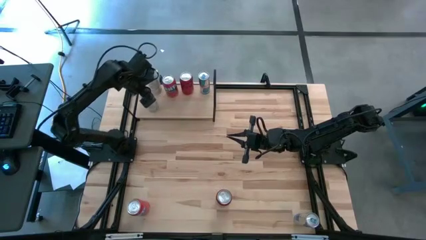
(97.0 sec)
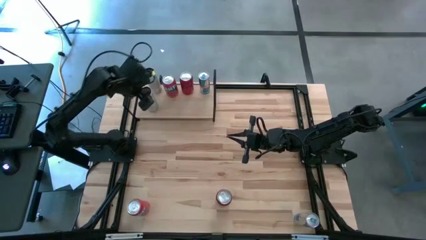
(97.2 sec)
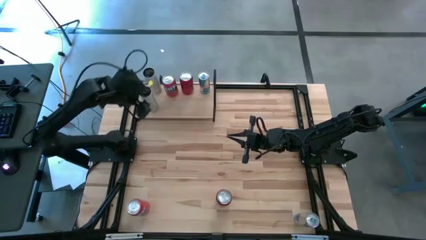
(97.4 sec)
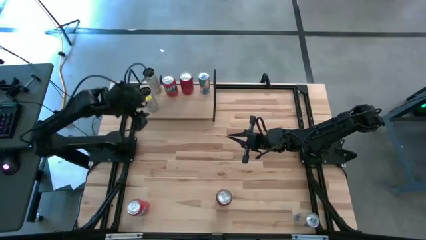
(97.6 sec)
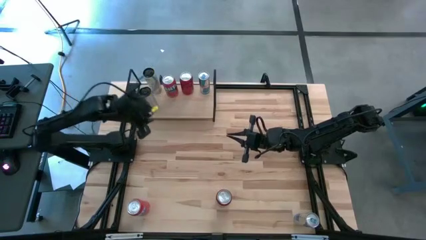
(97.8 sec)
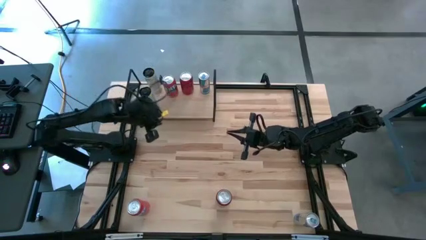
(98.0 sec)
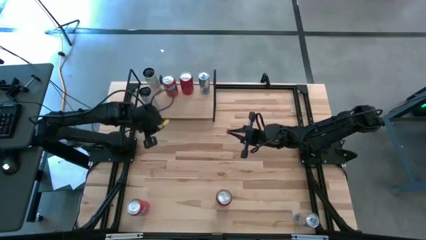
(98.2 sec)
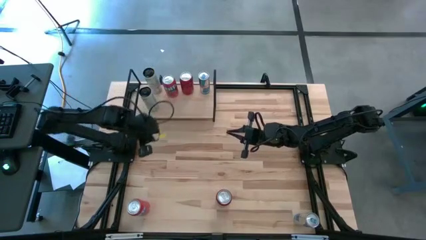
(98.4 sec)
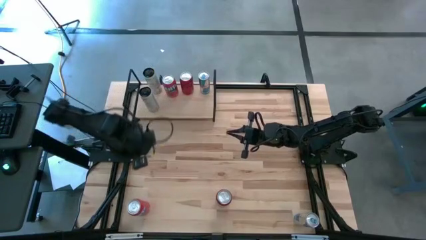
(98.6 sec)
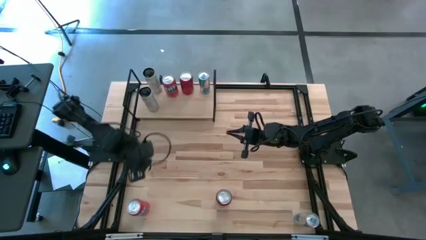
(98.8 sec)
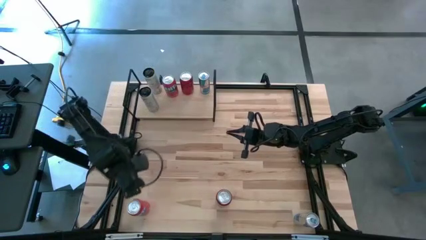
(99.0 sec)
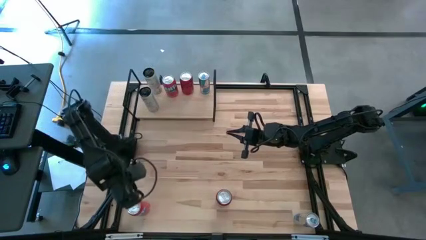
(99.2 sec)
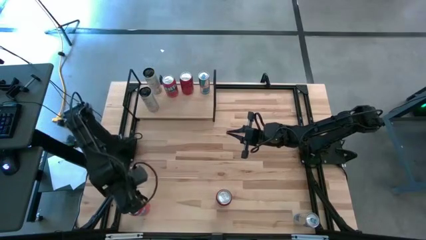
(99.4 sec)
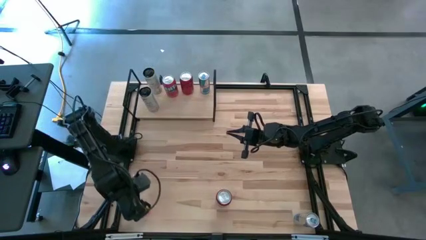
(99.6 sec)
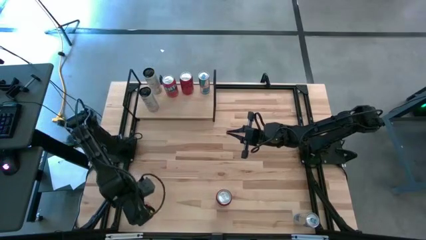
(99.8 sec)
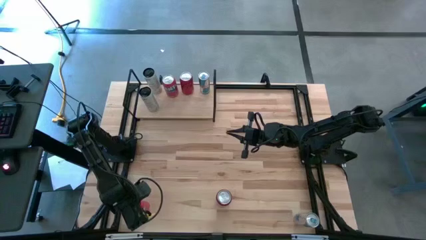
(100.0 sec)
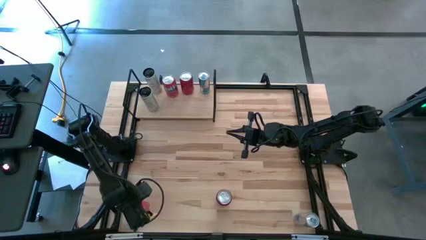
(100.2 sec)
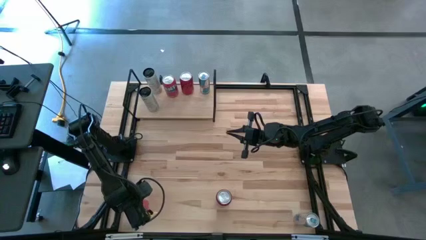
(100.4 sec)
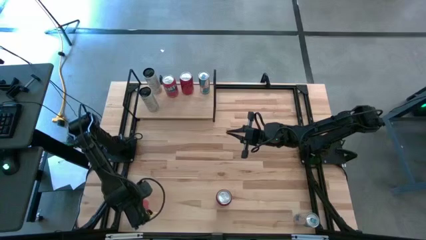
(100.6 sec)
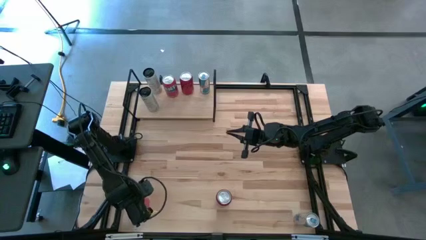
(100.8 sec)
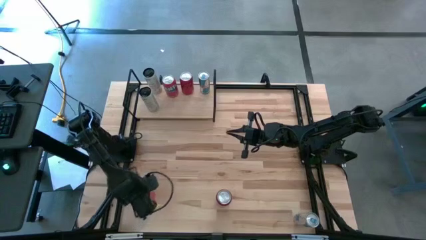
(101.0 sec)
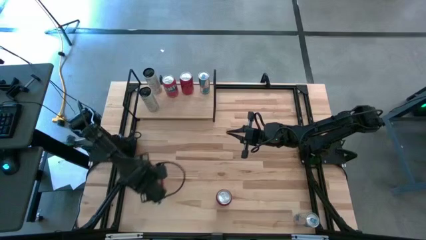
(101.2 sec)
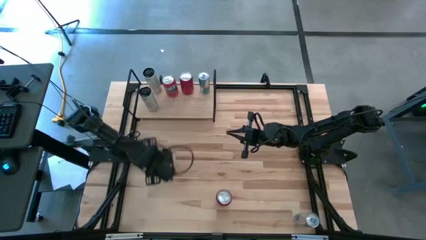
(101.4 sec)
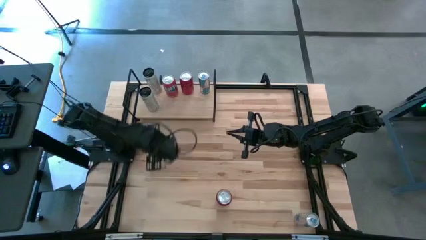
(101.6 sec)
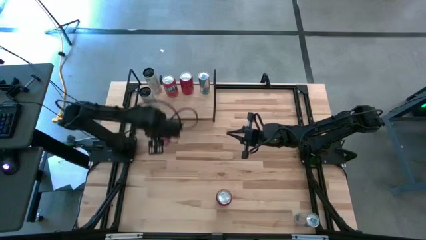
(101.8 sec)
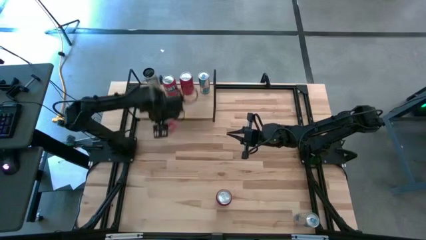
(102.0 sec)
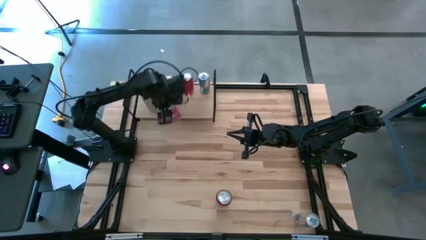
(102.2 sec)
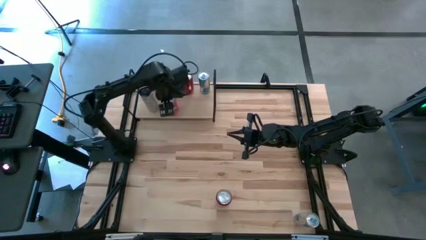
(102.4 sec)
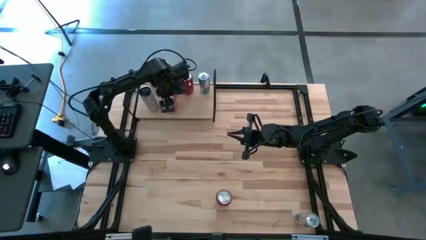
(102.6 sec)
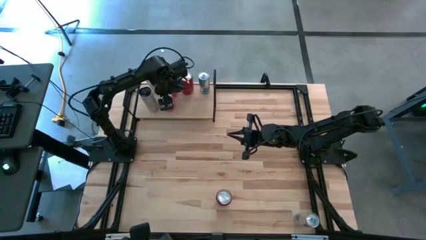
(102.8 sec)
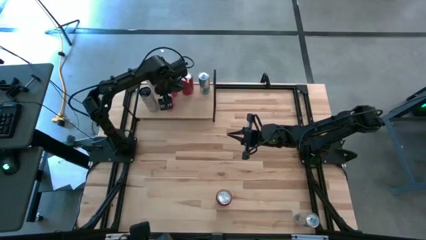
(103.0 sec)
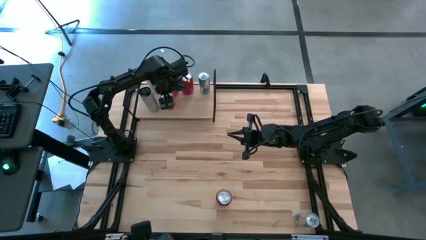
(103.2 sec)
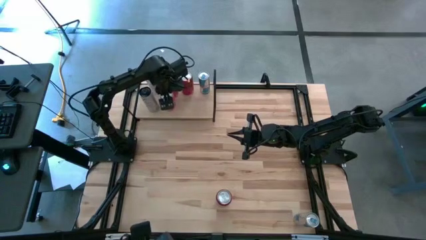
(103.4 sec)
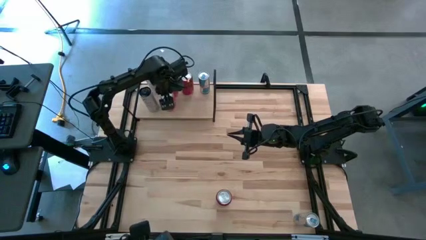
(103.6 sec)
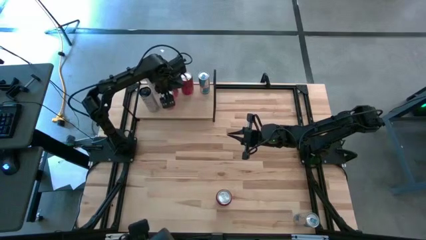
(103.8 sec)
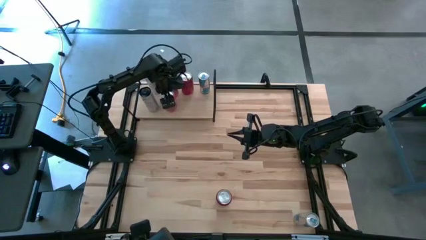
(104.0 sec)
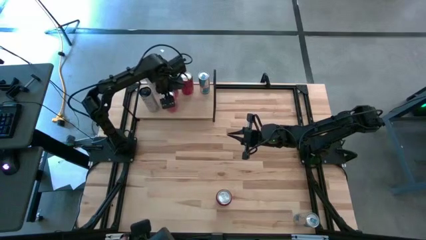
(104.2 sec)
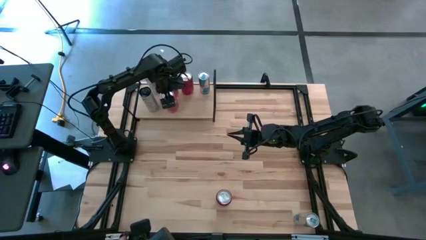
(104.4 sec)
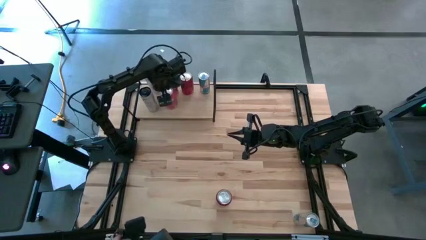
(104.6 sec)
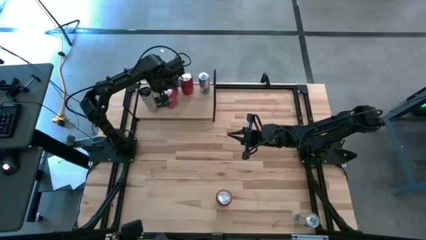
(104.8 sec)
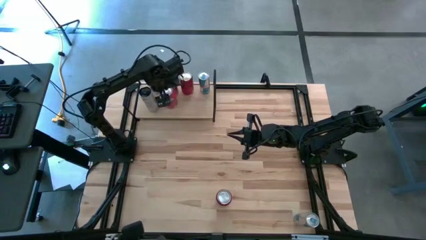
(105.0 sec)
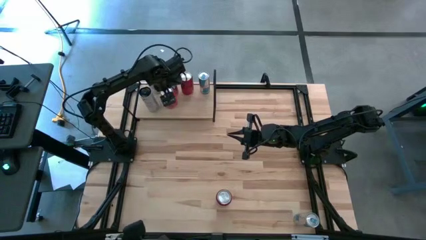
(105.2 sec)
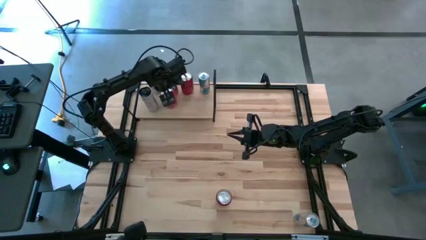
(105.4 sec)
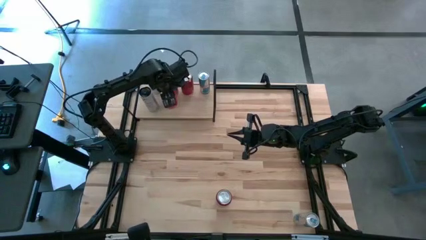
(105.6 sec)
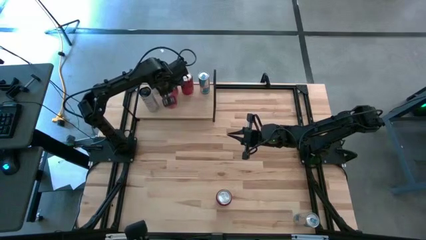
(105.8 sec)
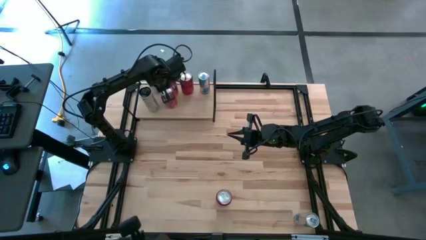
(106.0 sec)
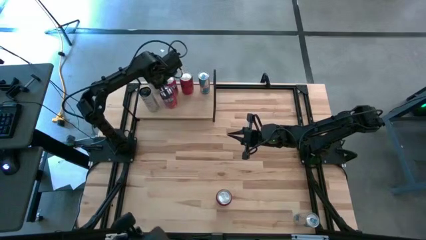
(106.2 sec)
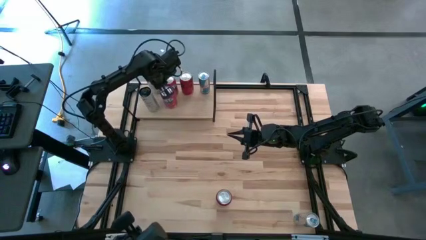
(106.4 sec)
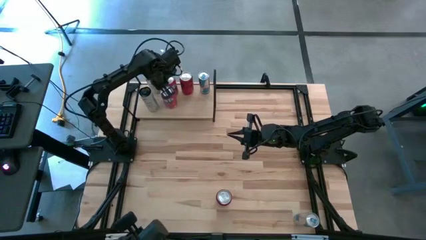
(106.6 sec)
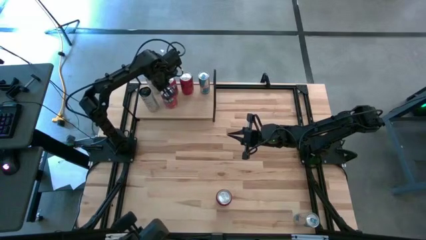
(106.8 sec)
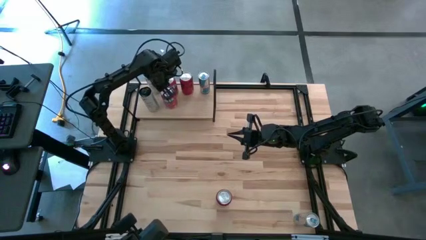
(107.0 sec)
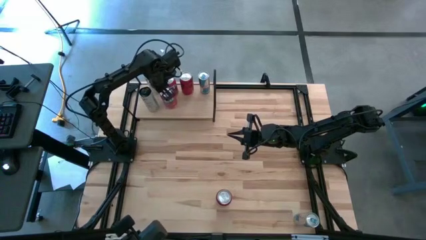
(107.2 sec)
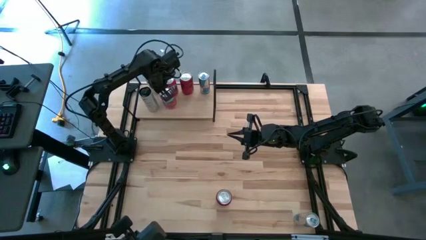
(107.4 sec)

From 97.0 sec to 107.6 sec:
Task: Place canned beverage on shelf
Put the orange soda can aligned with the other orange soda can on the shelf

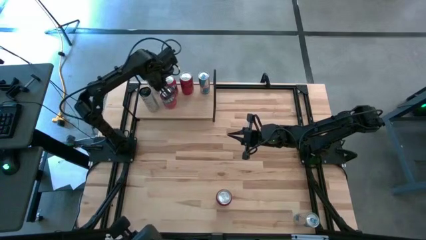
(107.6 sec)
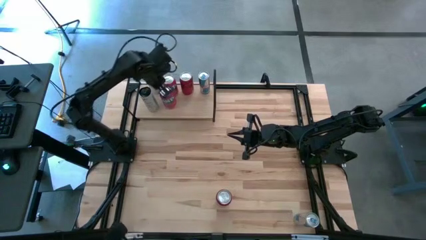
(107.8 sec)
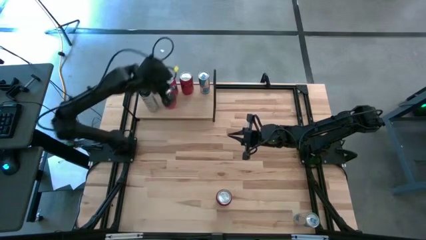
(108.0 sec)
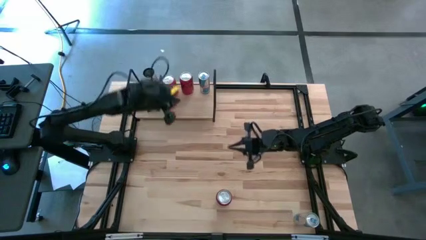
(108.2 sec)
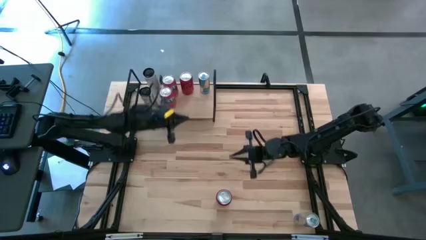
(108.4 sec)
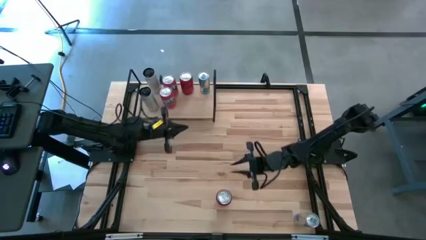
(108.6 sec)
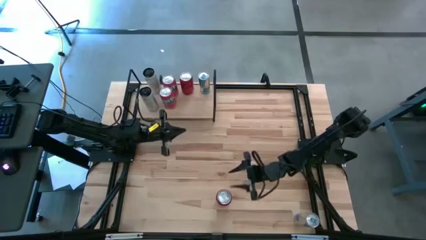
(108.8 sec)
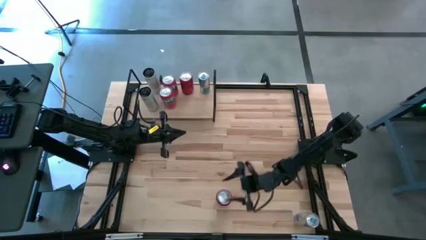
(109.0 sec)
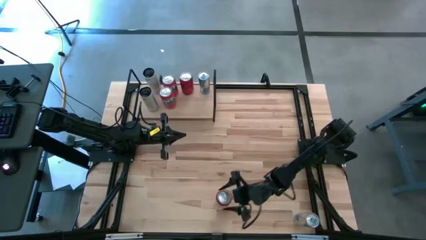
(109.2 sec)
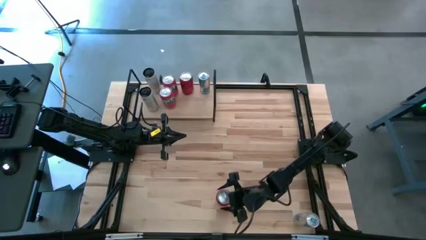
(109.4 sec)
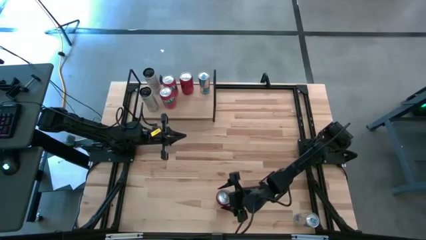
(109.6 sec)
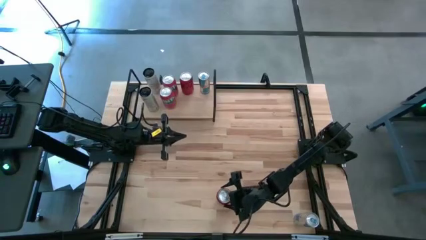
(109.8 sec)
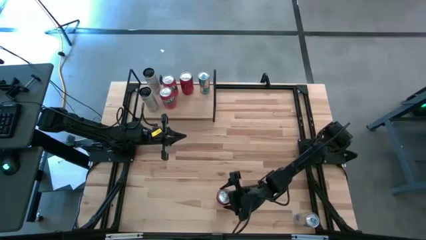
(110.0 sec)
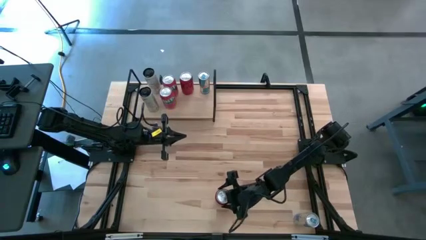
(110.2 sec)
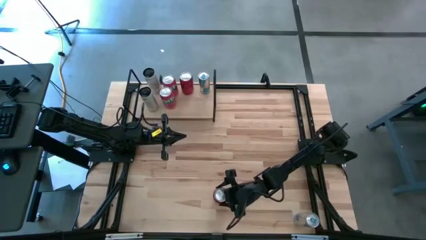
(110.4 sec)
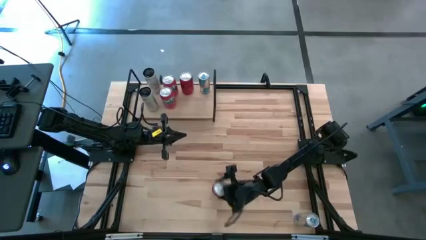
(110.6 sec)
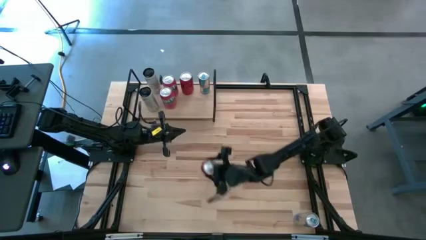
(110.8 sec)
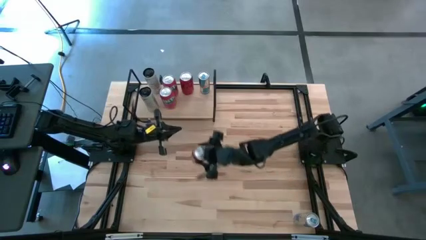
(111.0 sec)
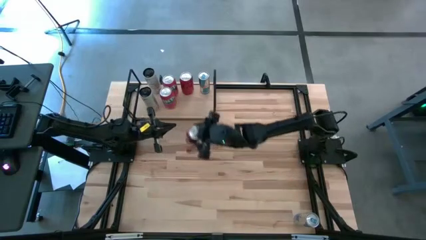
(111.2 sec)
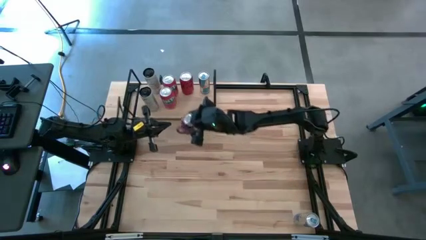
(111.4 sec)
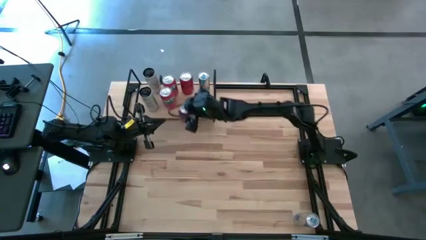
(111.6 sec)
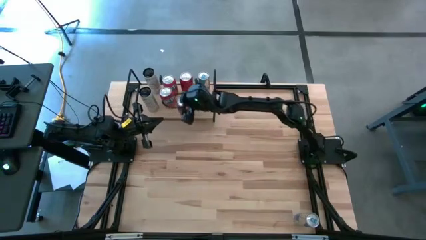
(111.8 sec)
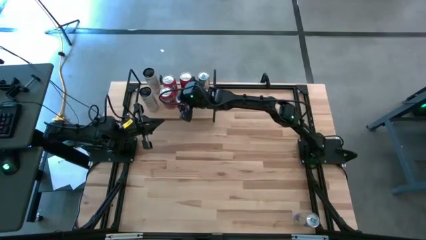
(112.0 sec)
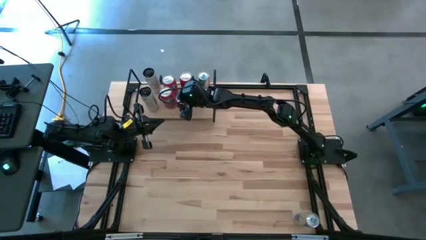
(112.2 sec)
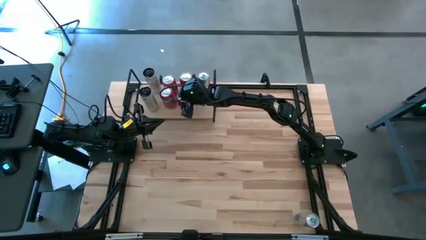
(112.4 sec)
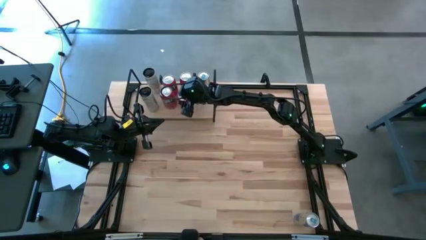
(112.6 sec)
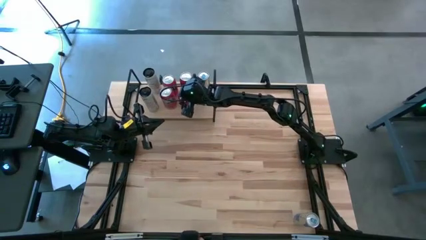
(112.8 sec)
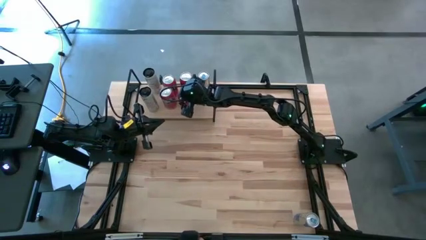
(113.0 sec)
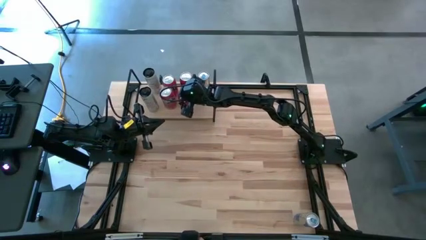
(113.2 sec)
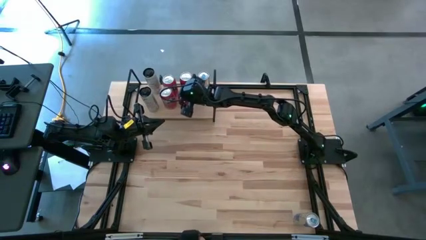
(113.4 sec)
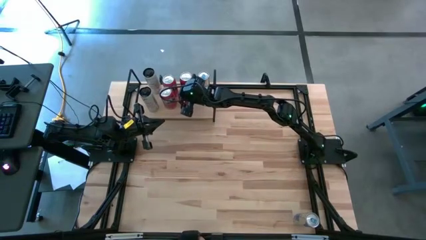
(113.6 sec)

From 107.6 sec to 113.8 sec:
Put the red soda can aligned with the other red soda can on the shelf
